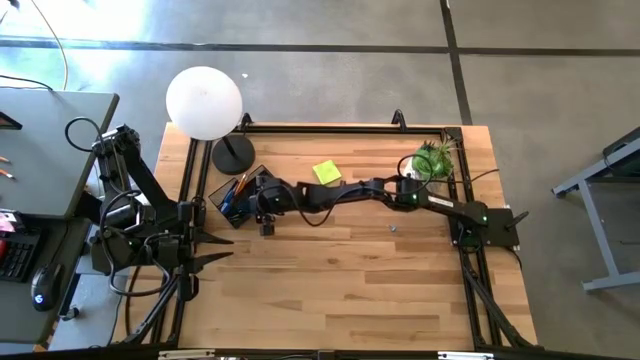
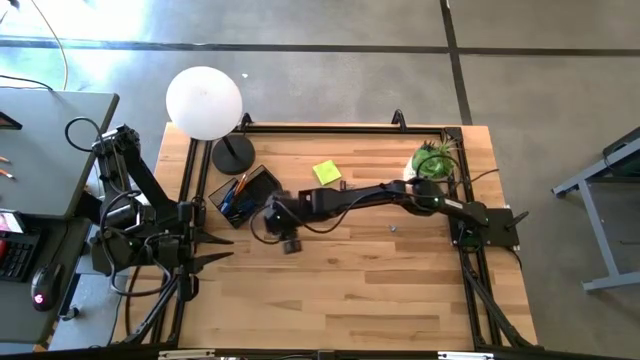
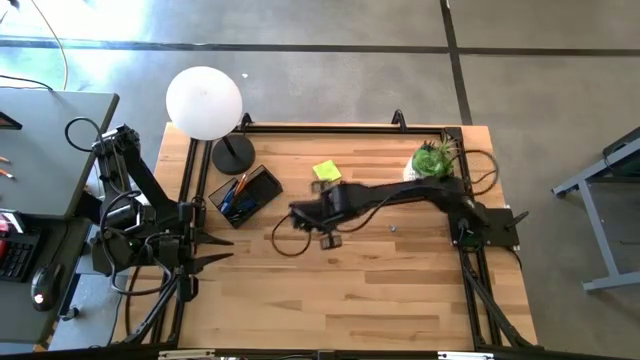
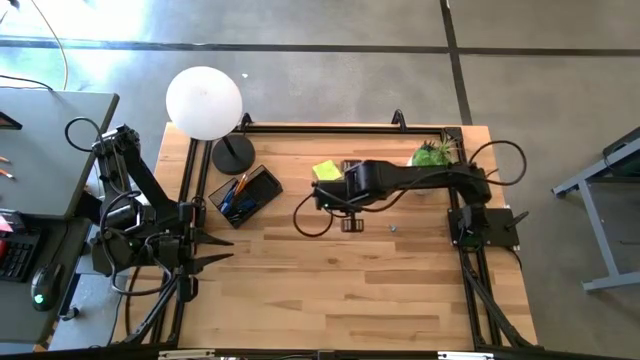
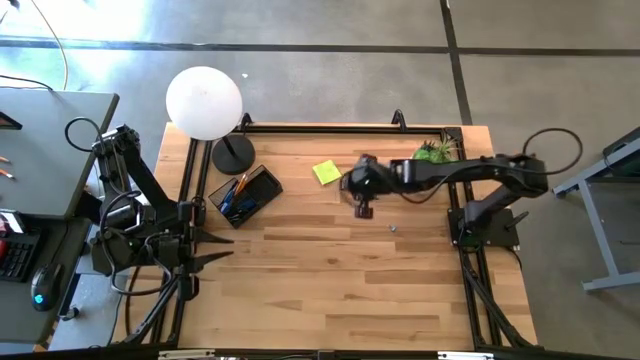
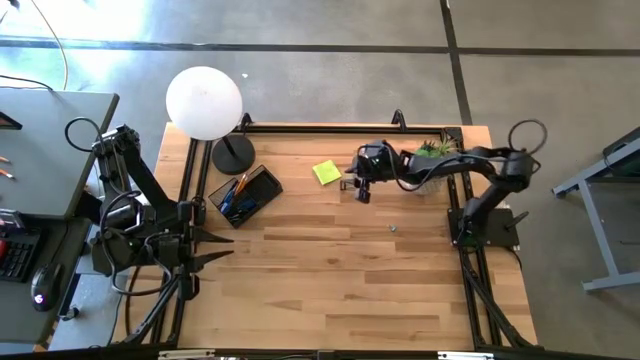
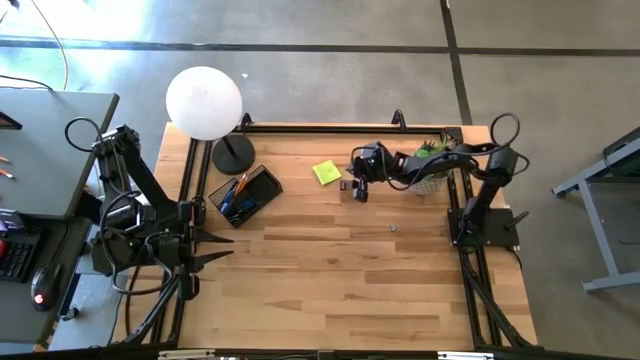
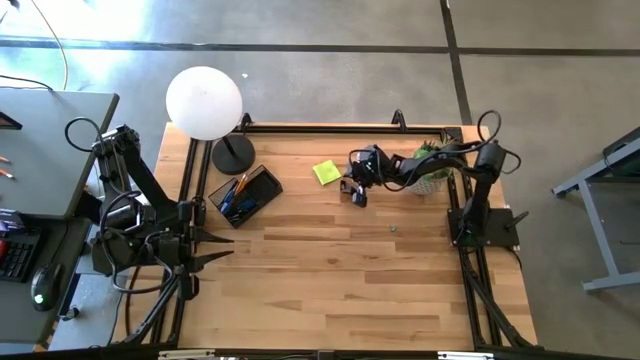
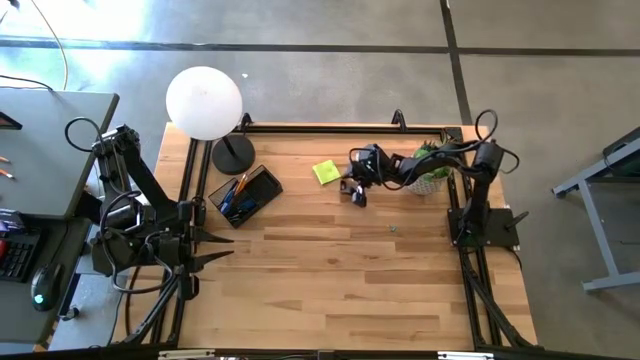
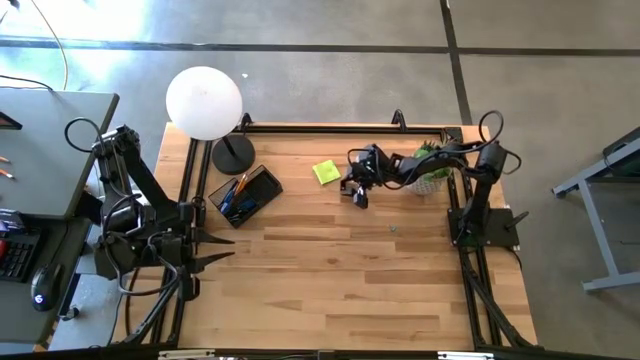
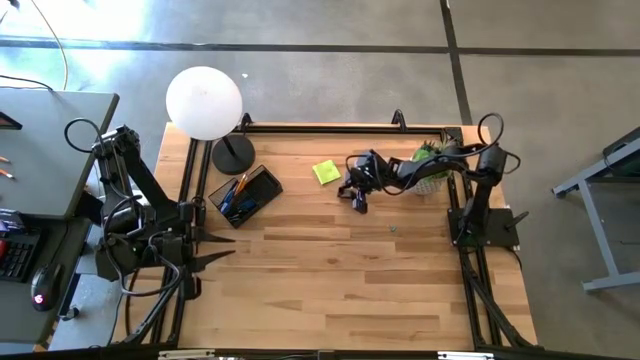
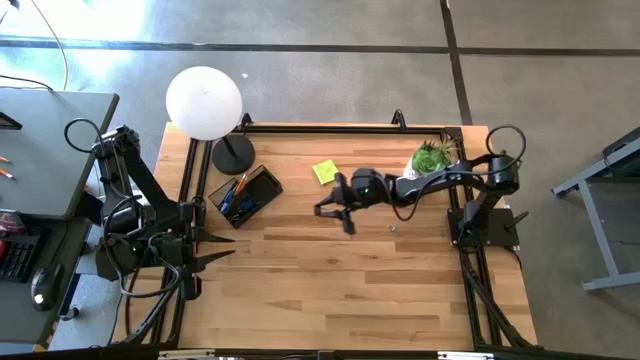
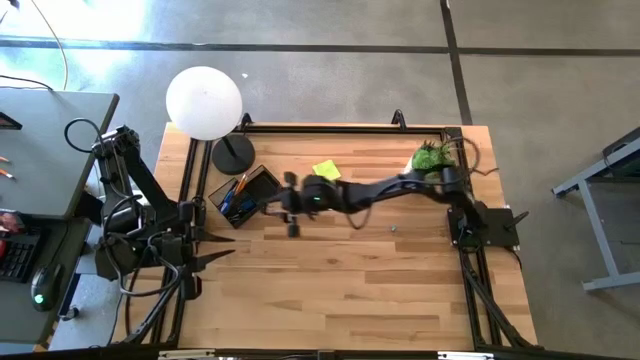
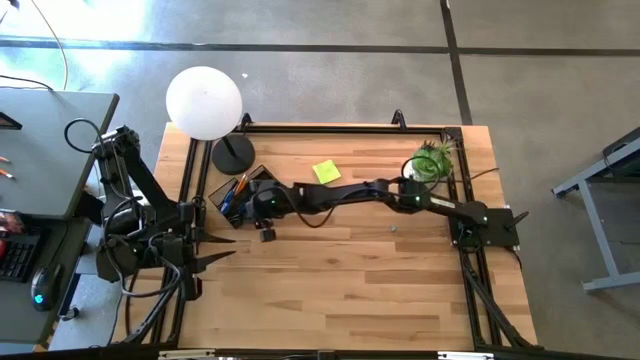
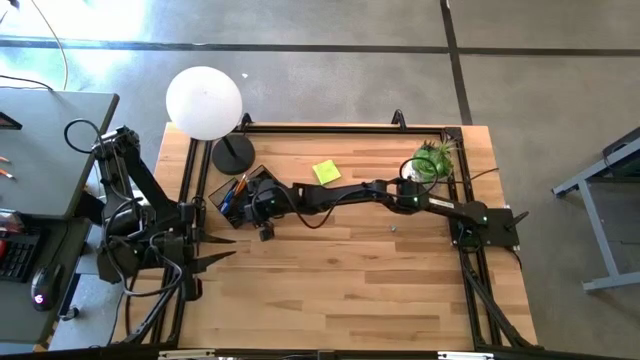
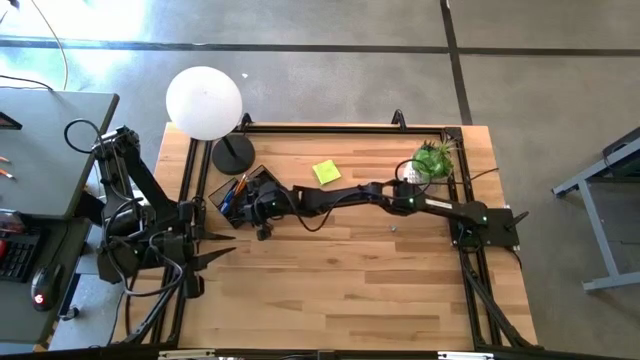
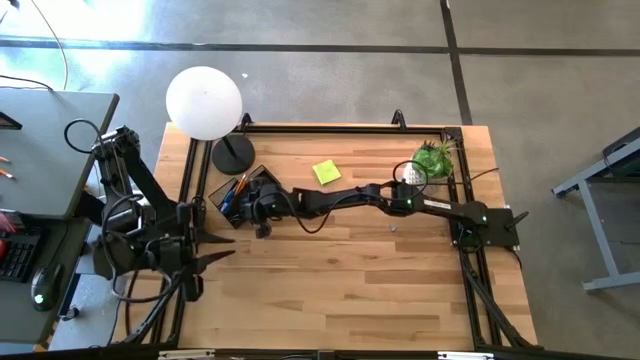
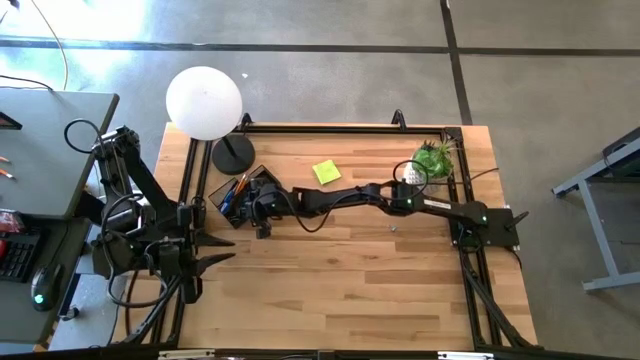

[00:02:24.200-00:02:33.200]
Task: Pick and place office supplies into organizer
Put the black binder clip into the black mesh desk organizer

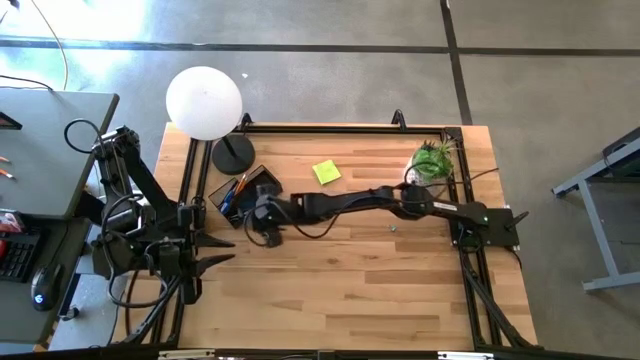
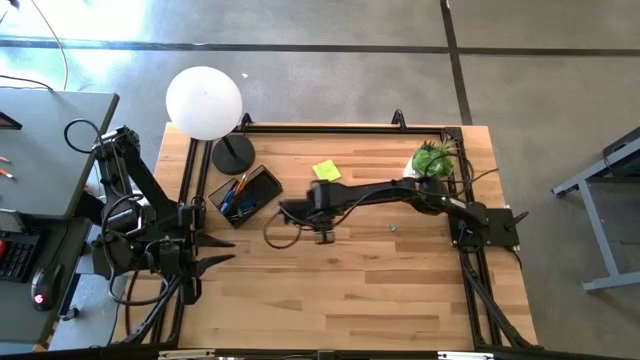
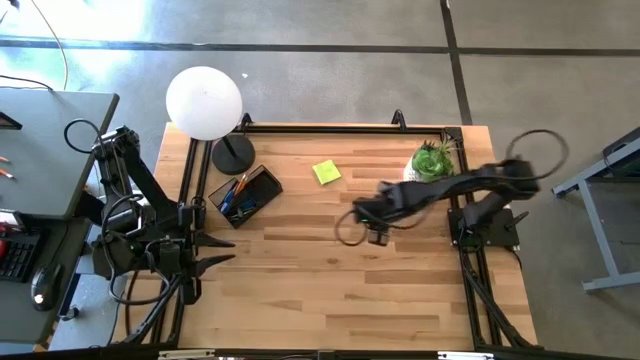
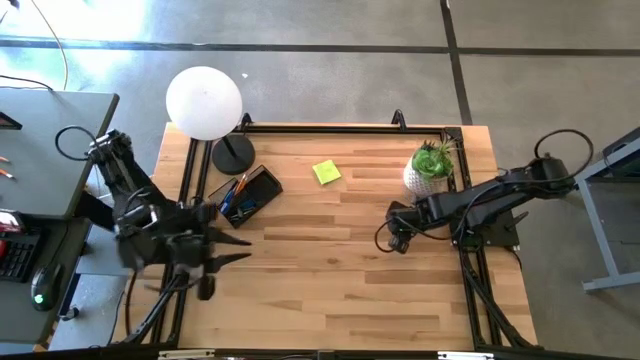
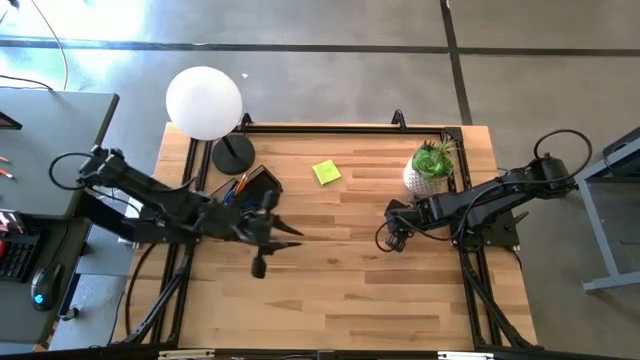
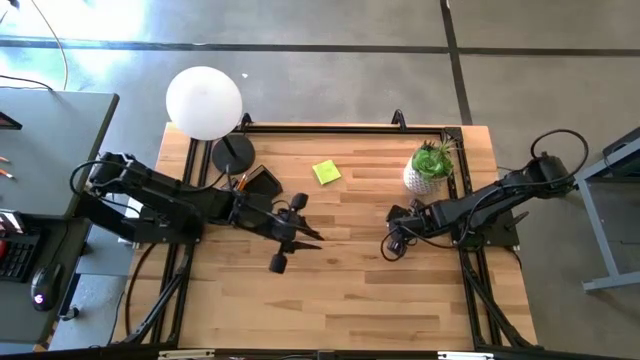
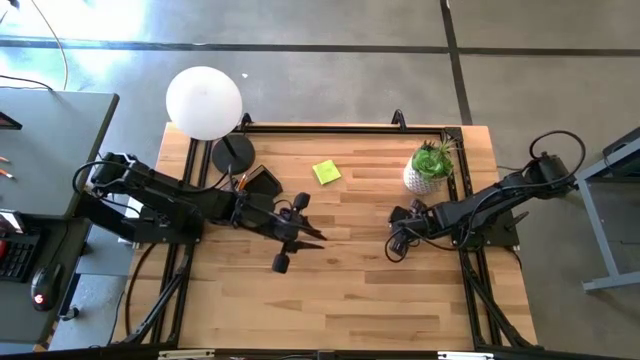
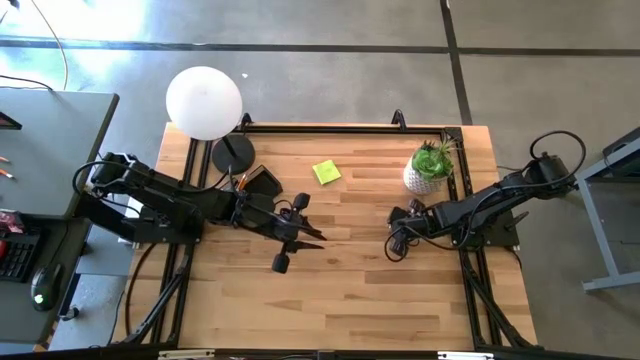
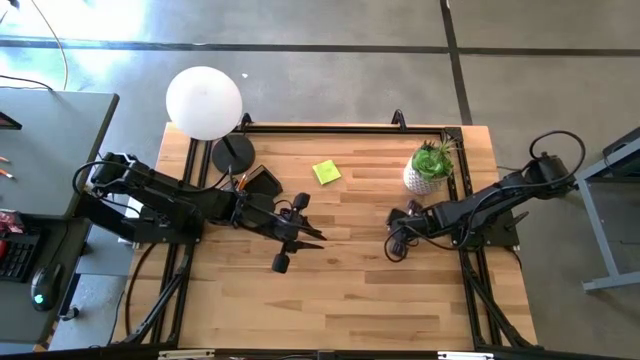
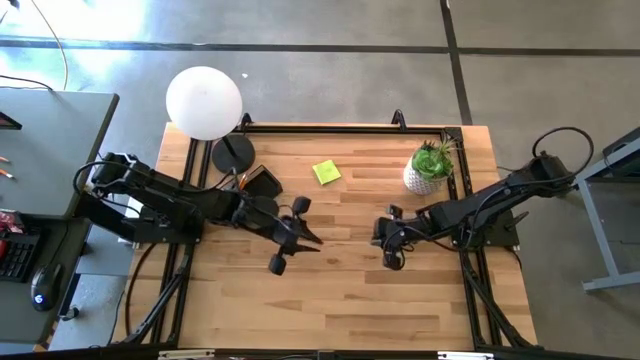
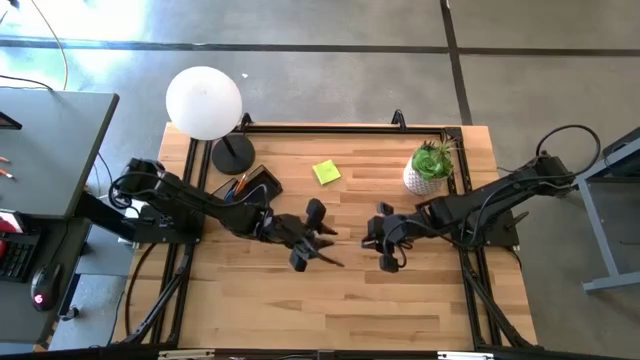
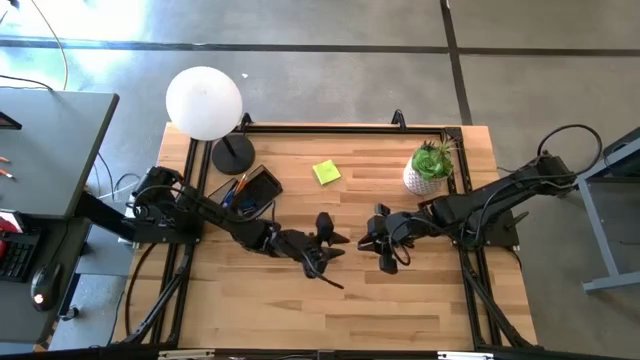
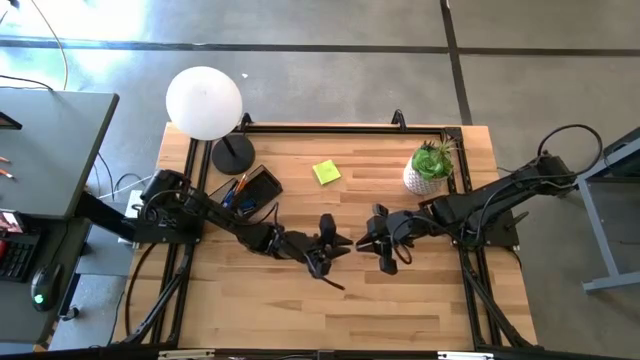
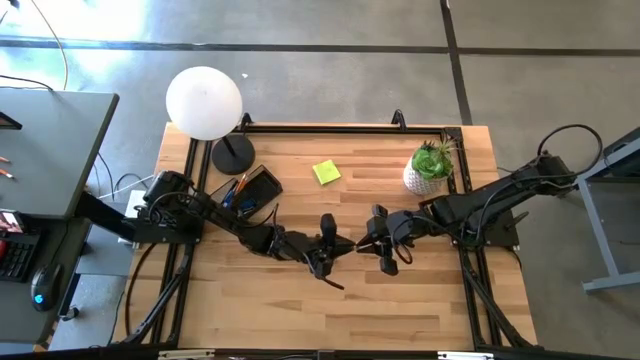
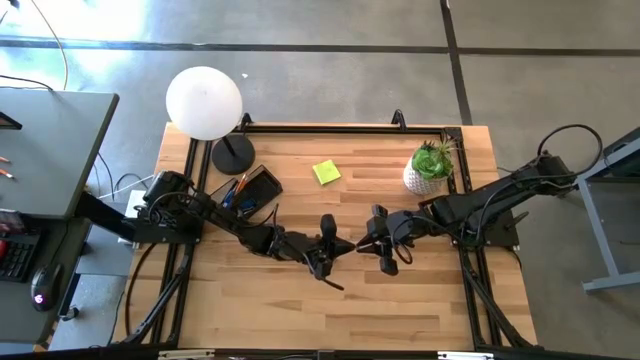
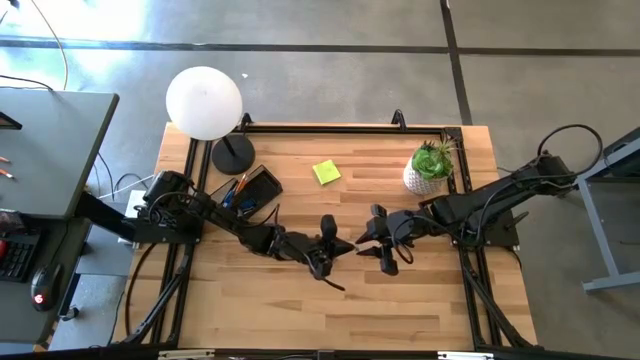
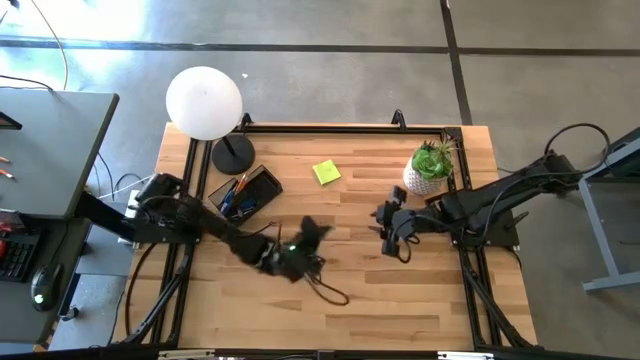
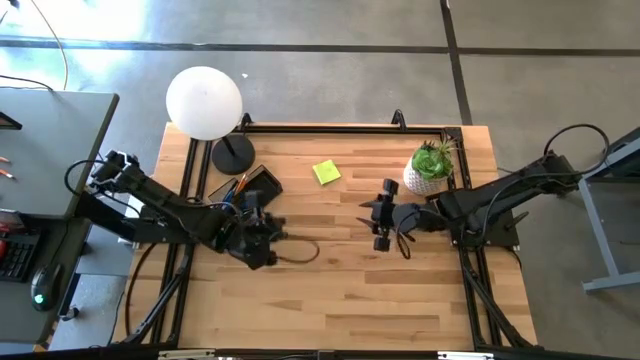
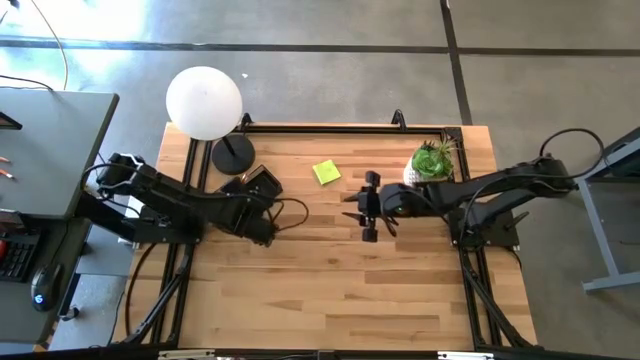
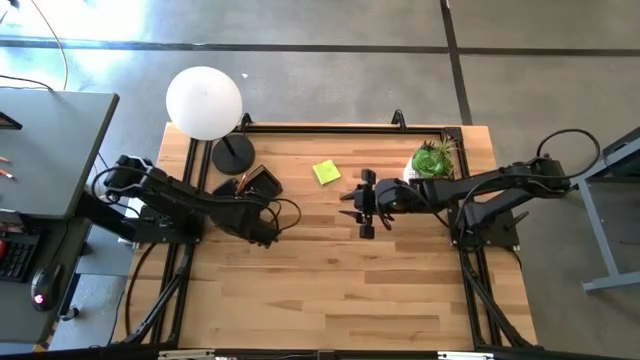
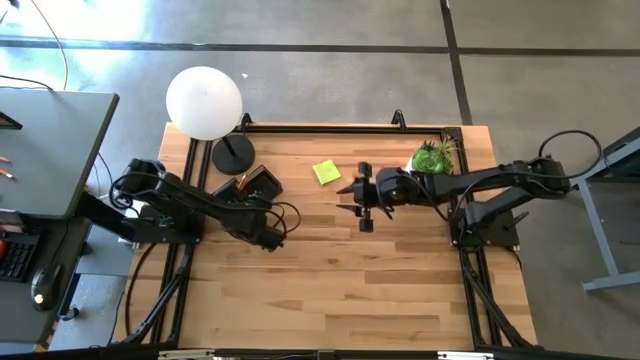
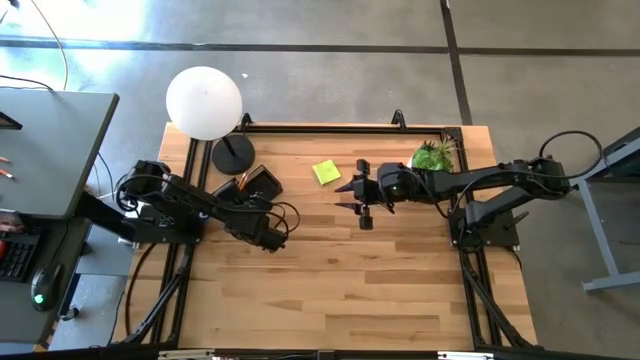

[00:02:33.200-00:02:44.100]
Put the light blue binder clip into the black mesh desk organizer

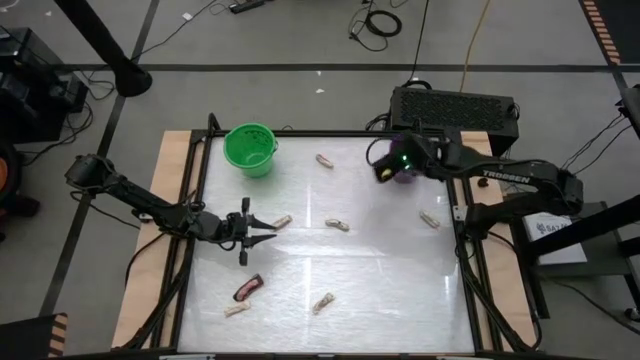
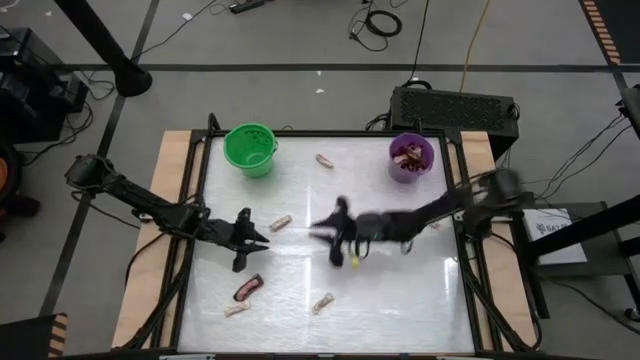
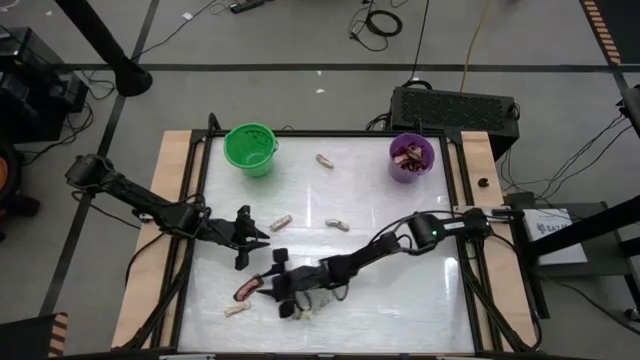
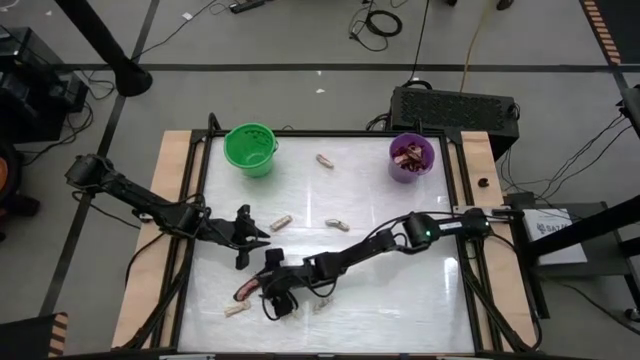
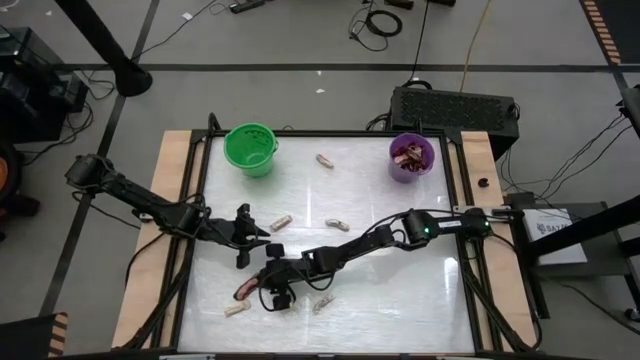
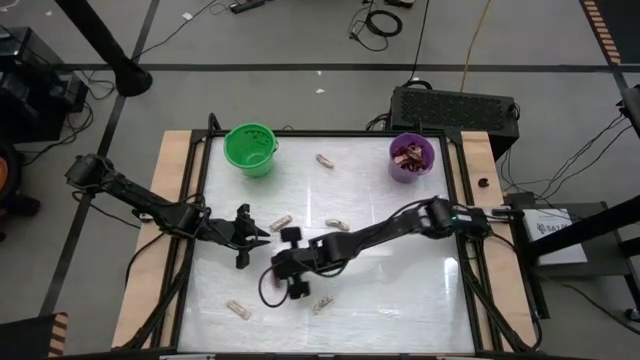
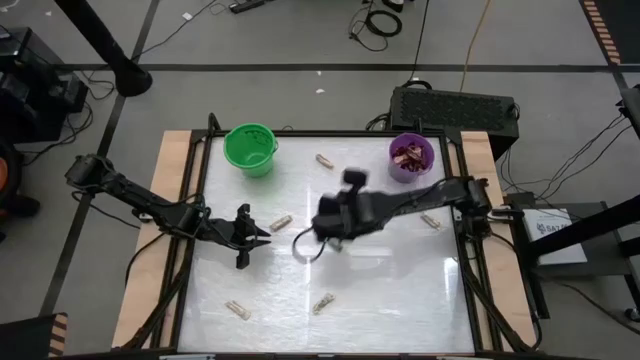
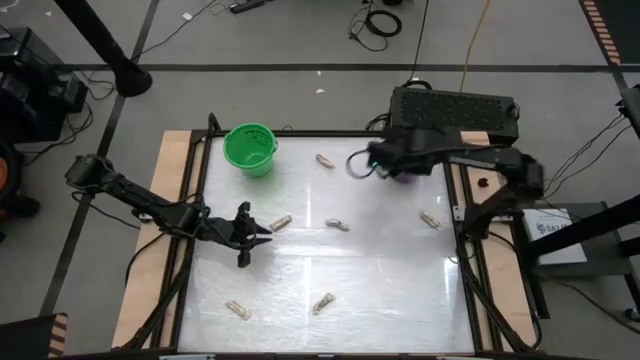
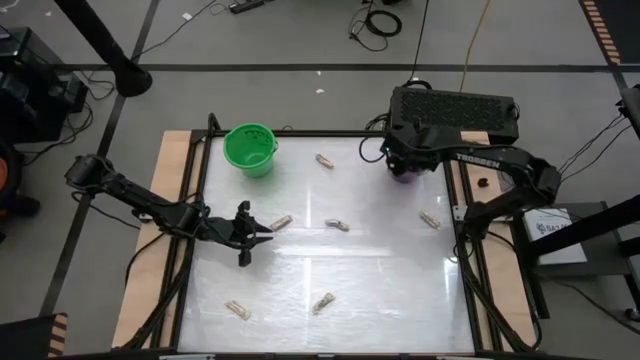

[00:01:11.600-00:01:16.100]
Task: Sort candy by brand, put in halloween buckets
Put the brown chocolate bar into the purple bucket
